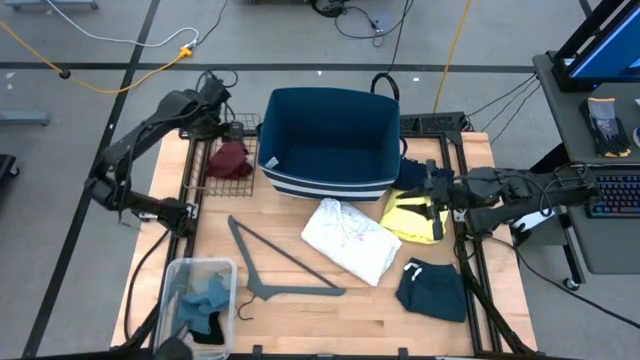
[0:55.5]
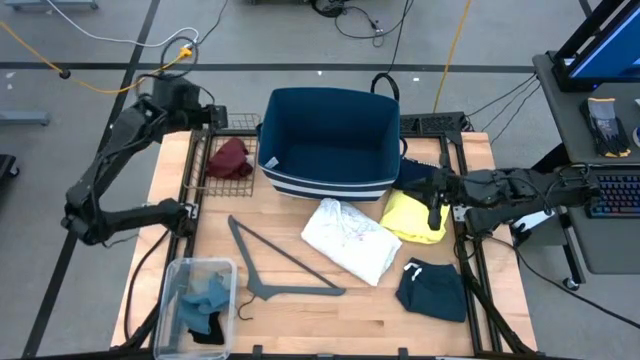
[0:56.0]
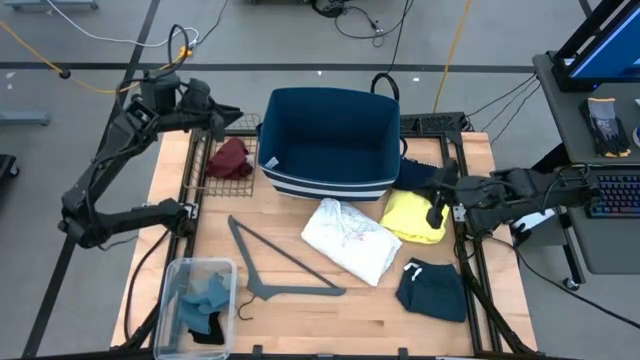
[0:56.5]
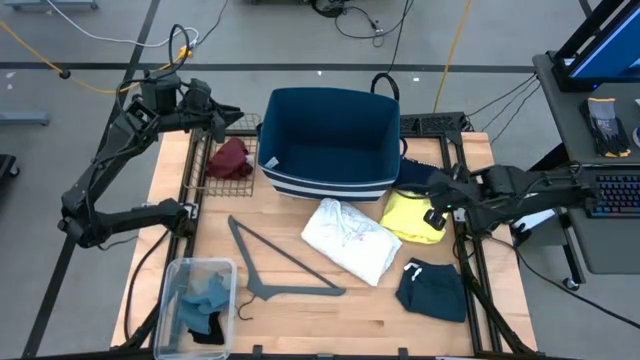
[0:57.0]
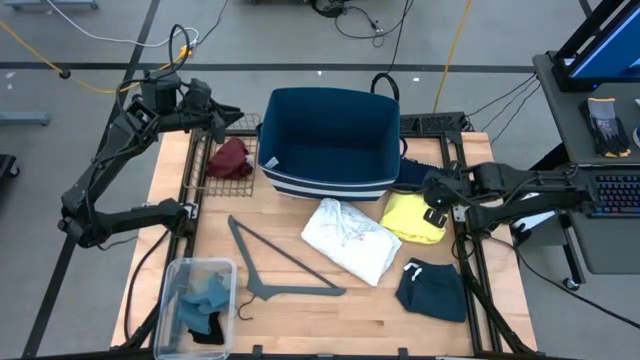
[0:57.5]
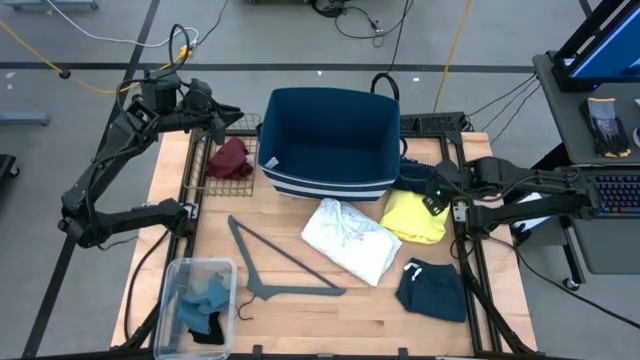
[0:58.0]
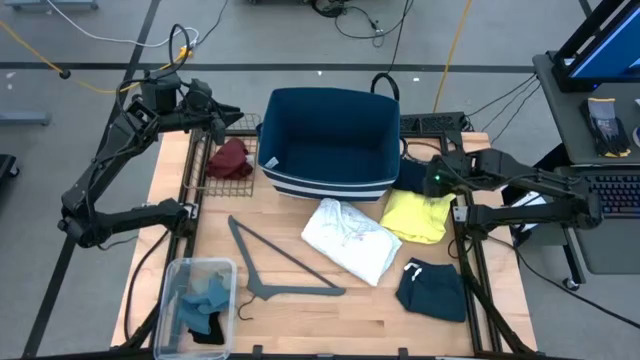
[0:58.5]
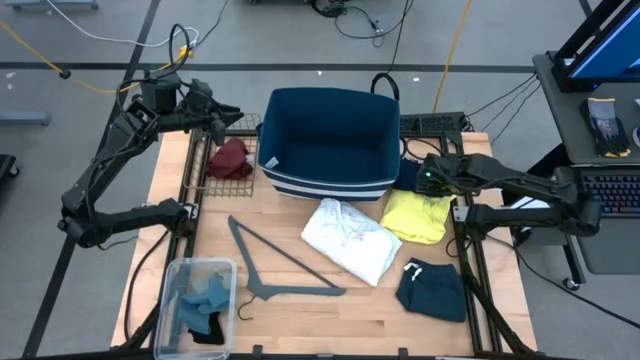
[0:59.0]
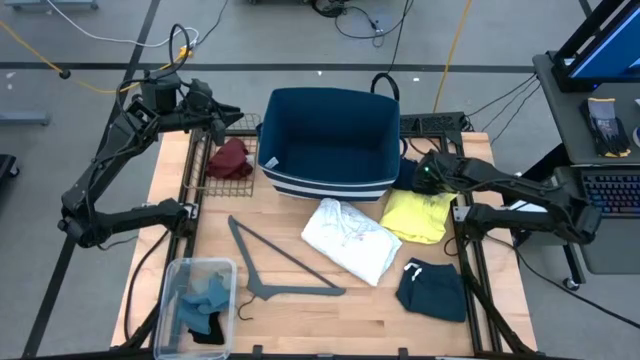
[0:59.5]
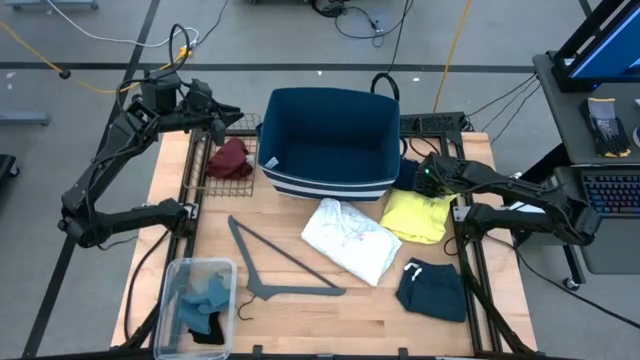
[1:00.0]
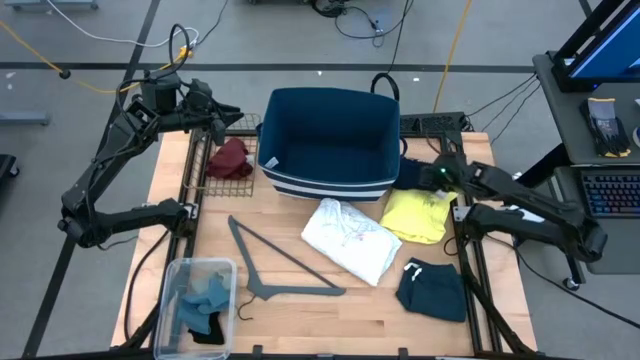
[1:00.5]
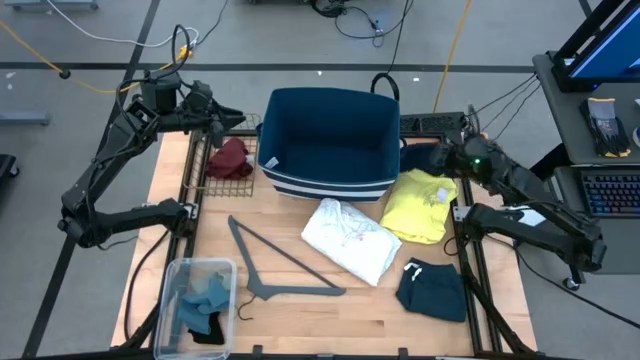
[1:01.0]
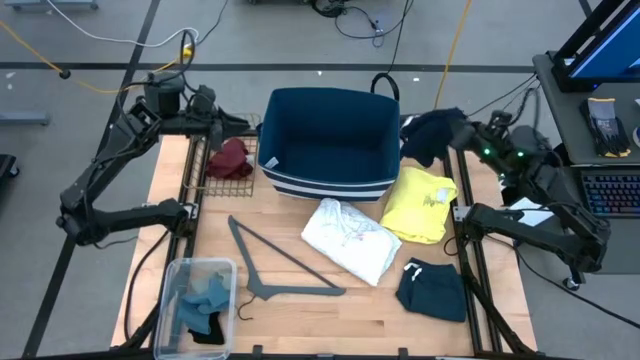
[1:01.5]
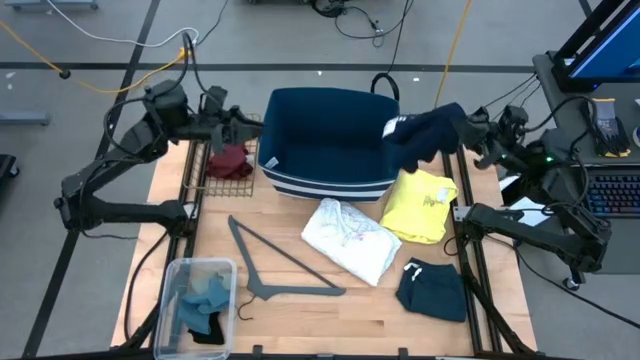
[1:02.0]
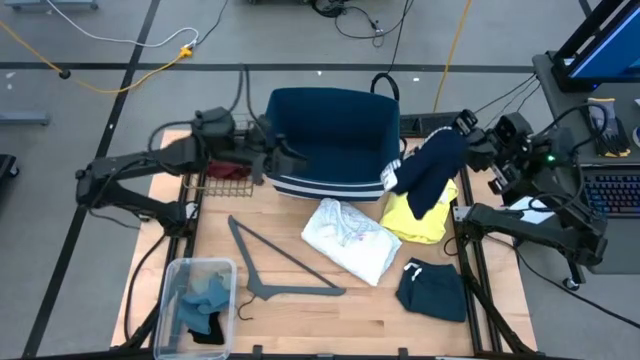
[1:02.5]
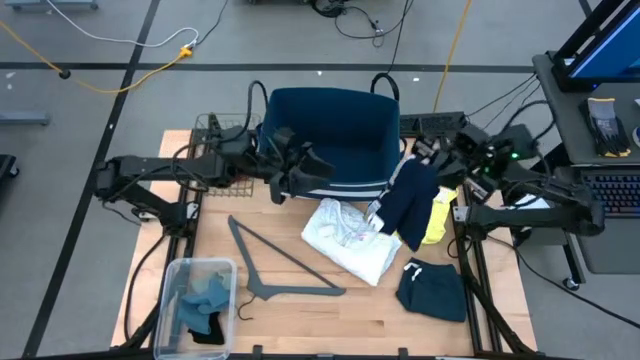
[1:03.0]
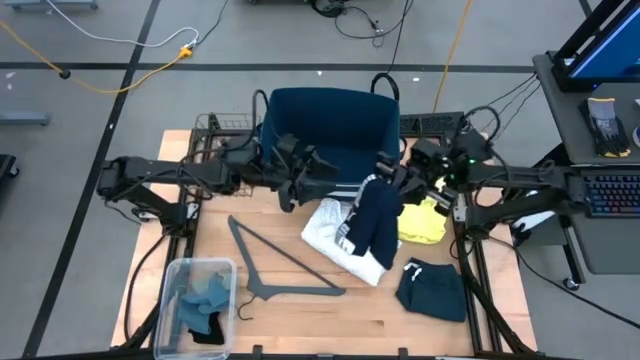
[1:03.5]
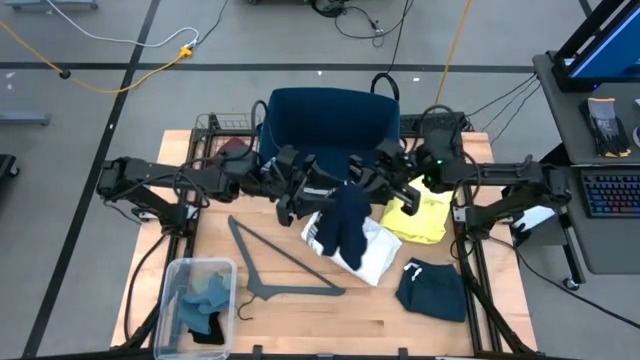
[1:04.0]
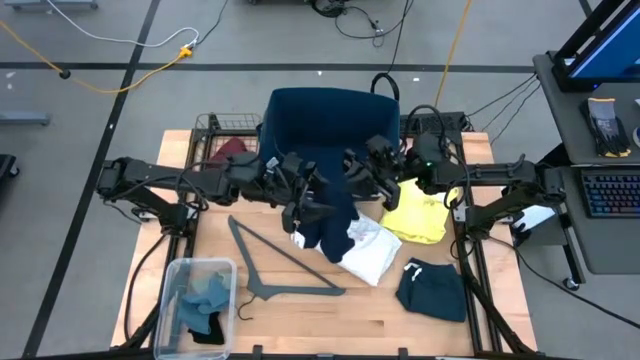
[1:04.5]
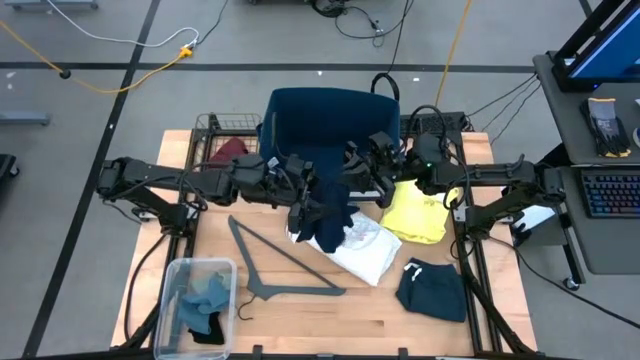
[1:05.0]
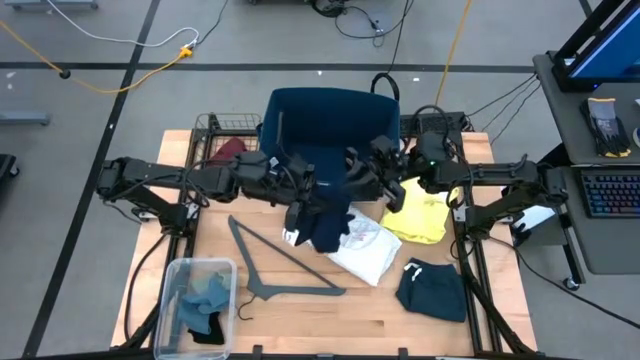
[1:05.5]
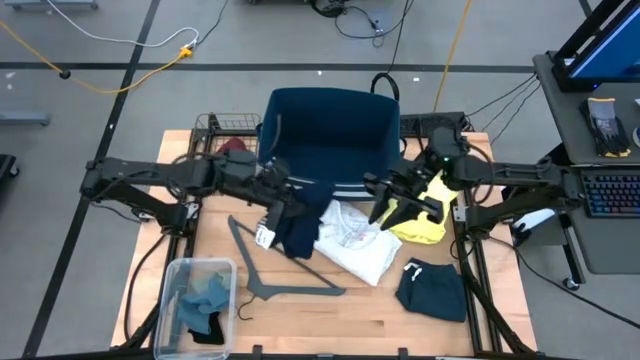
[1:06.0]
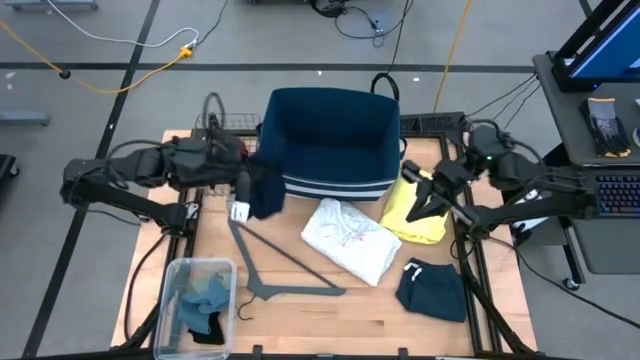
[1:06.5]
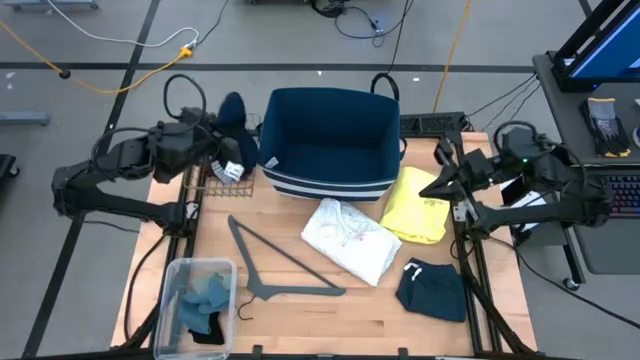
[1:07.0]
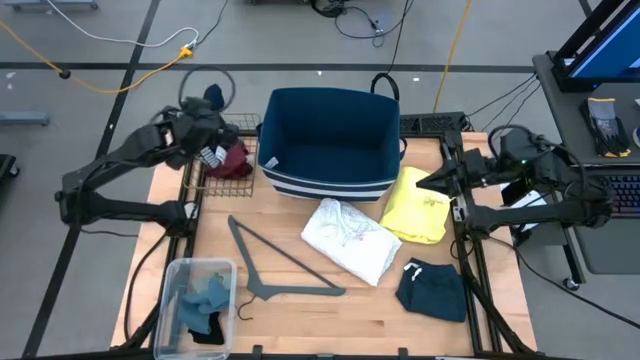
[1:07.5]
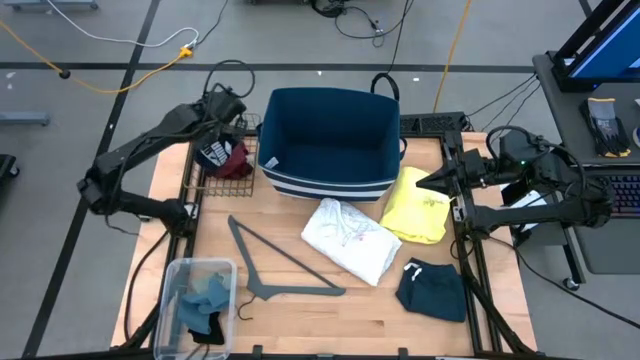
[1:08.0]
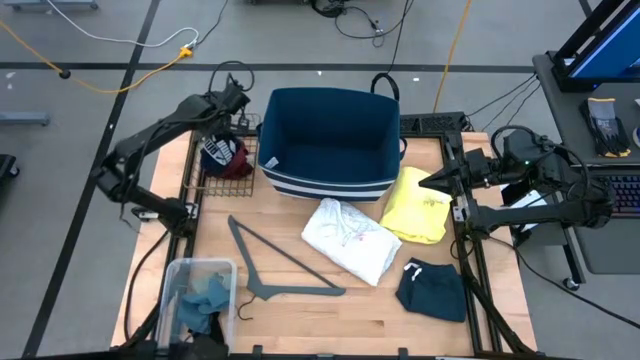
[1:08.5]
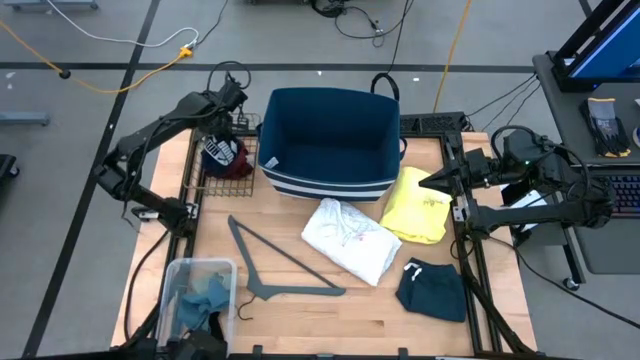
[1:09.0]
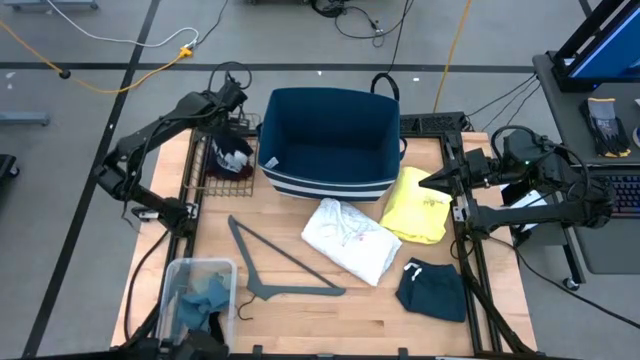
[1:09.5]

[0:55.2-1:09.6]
Task: Pick & Place Cloths
Put the dark blue boxer into the brown wire basket

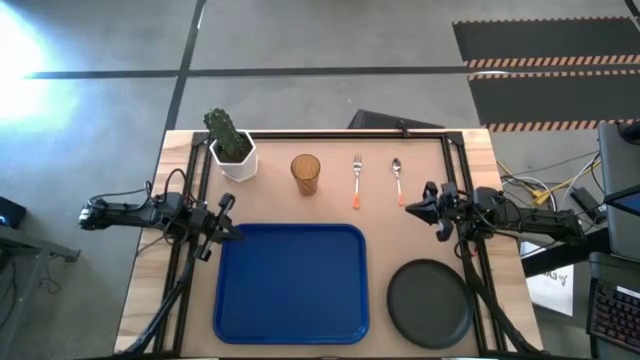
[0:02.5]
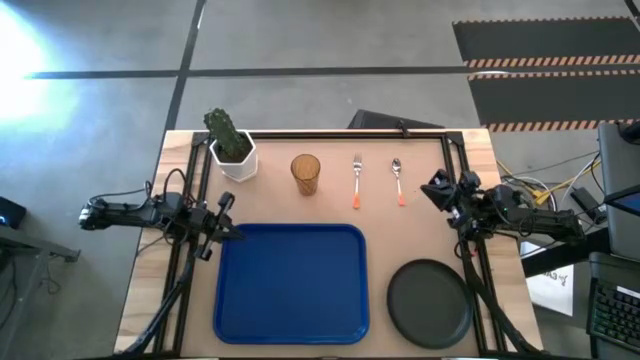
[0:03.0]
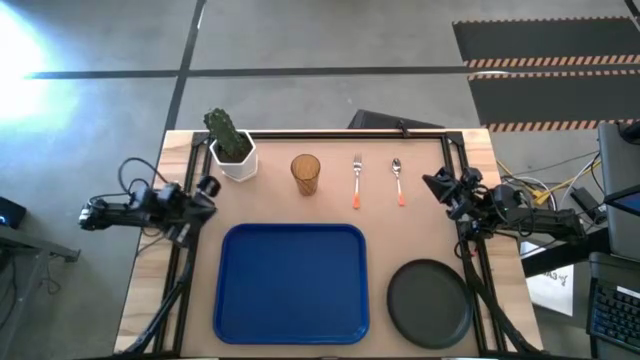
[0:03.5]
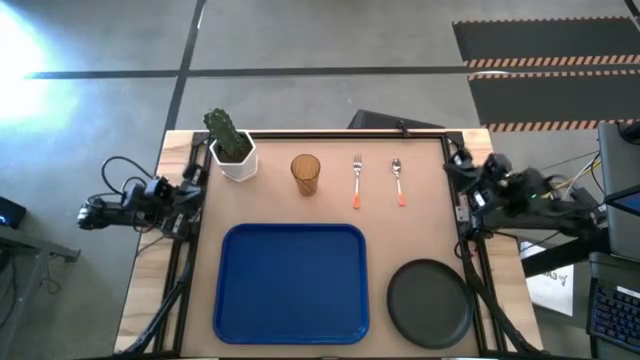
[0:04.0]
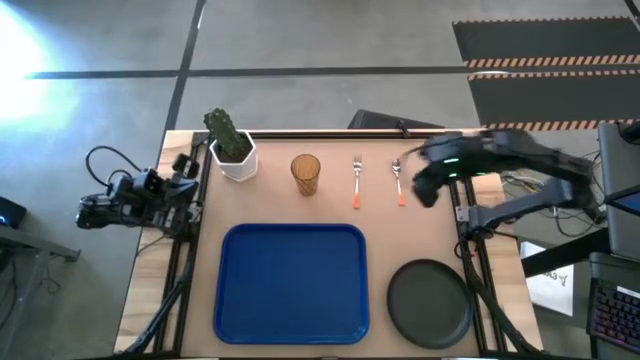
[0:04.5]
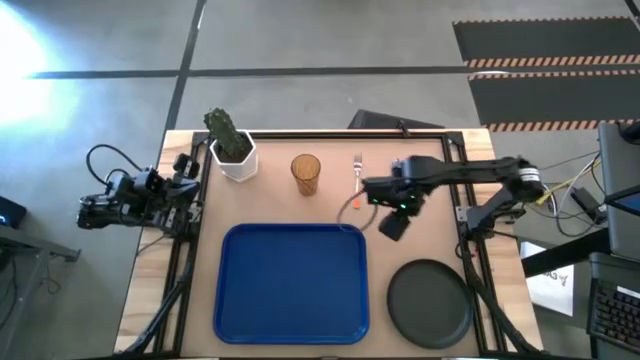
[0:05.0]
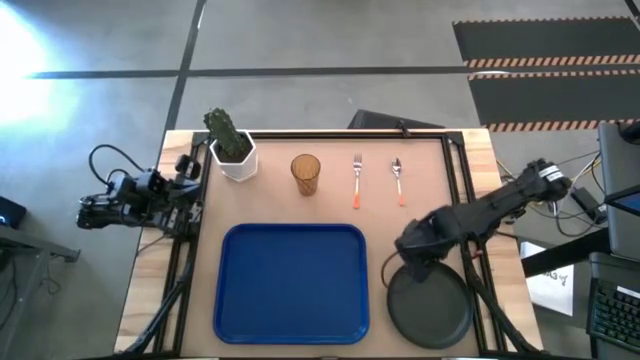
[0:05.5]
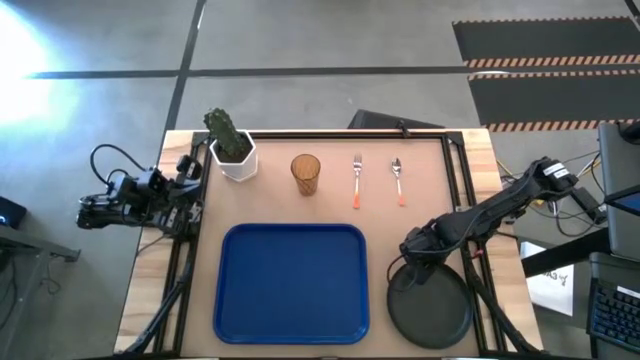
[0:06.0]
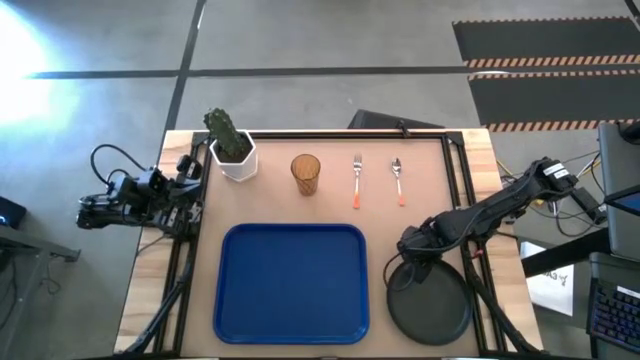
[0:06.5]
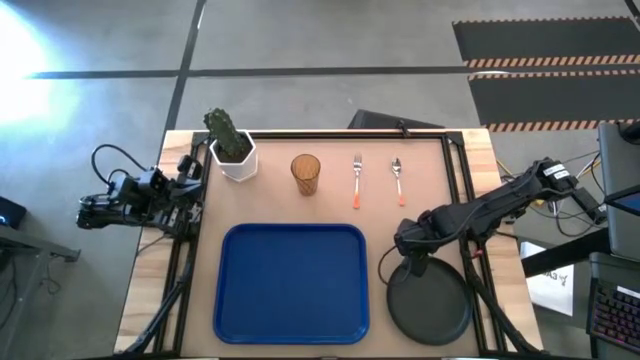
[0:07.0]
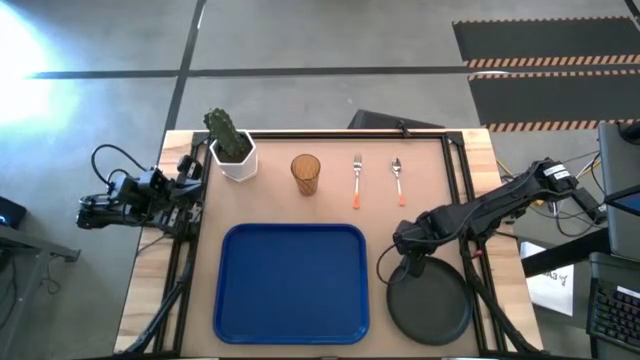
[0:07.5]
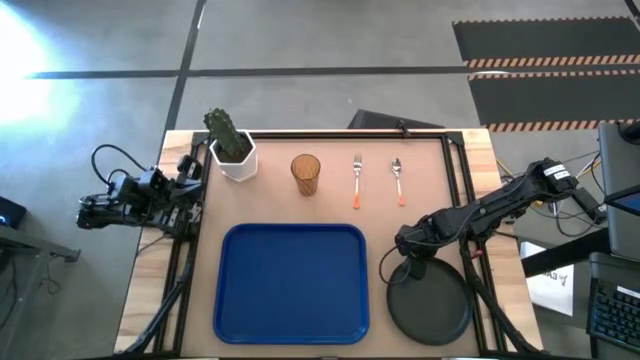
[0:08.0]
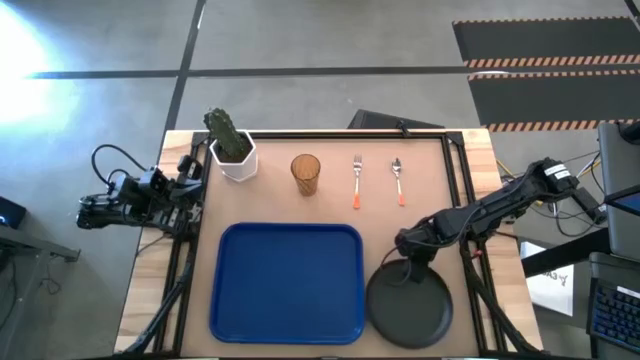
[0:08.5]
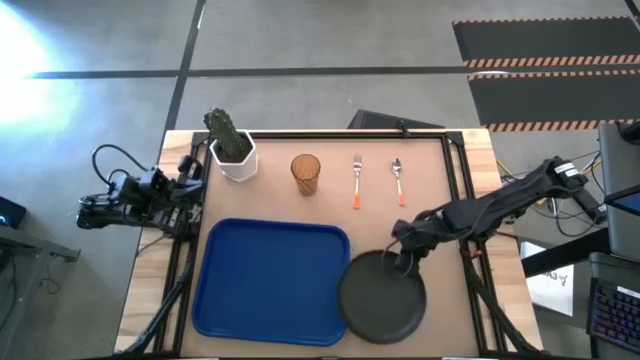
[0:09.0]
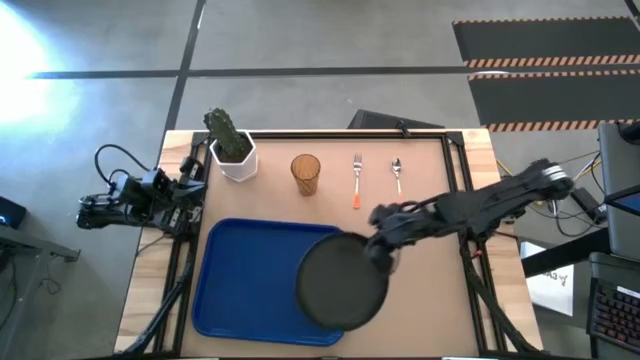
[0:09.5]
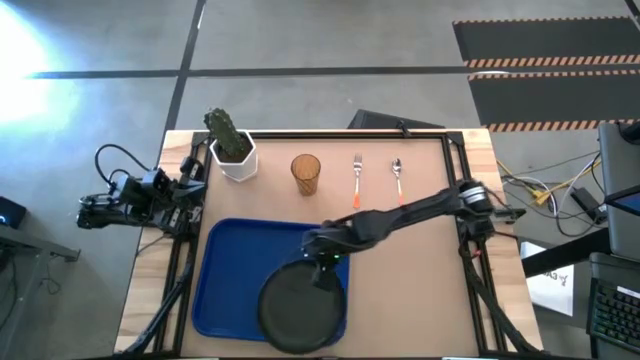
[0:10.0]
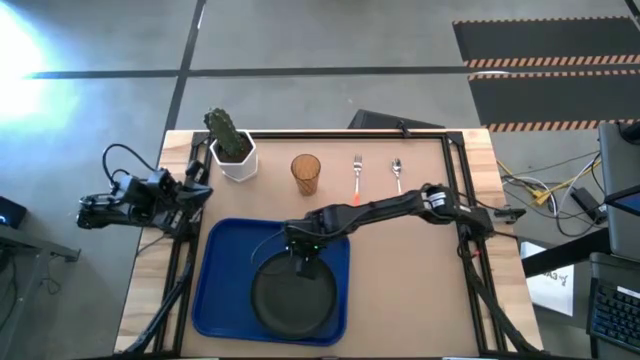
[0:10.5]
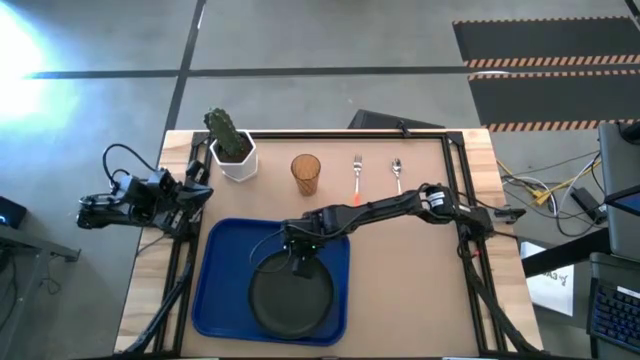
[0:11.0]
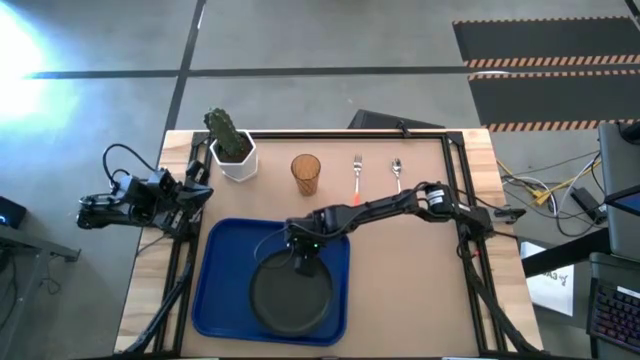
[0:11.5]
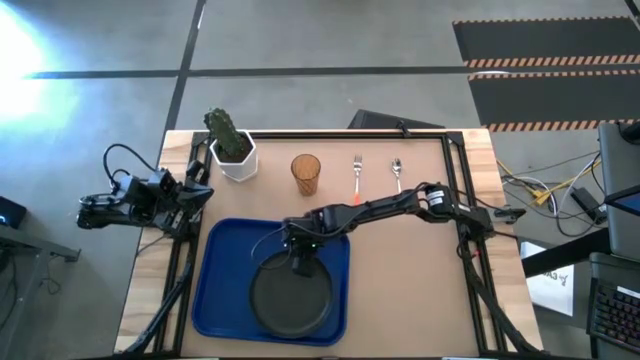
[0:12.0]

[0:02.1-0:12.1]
Task: Pick and place plate/cup/fork/spoon on tray
Put the black plate on the blue serving tray
